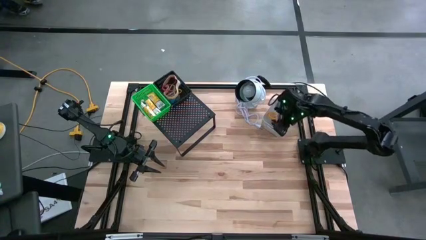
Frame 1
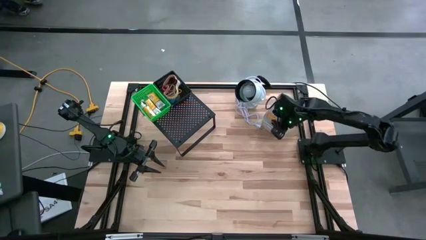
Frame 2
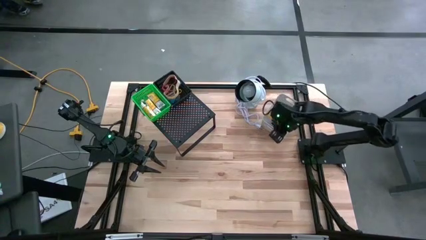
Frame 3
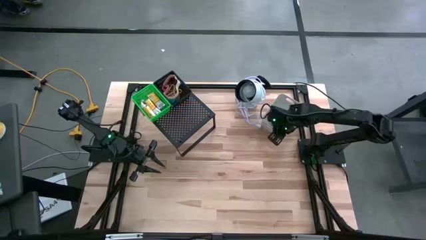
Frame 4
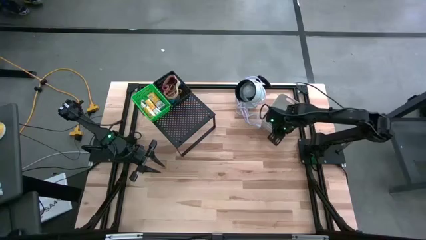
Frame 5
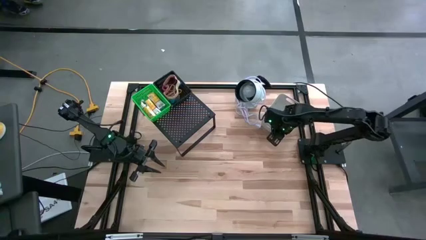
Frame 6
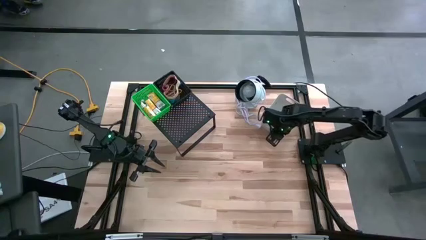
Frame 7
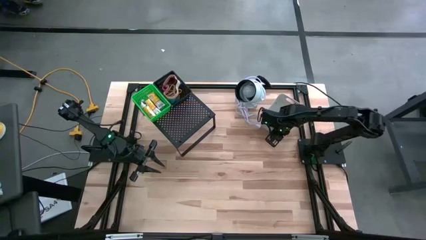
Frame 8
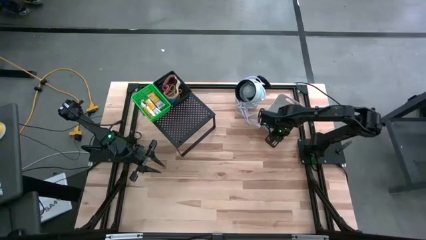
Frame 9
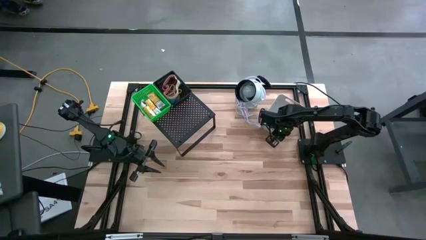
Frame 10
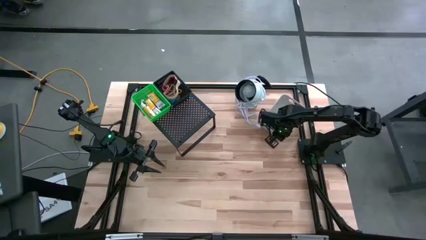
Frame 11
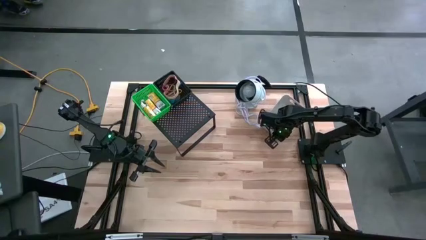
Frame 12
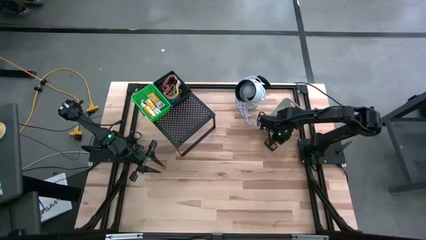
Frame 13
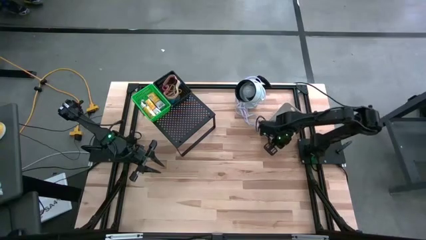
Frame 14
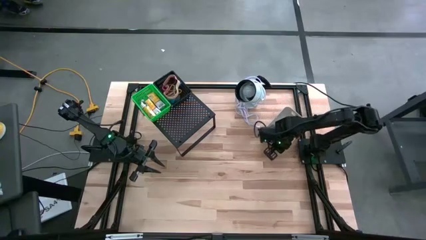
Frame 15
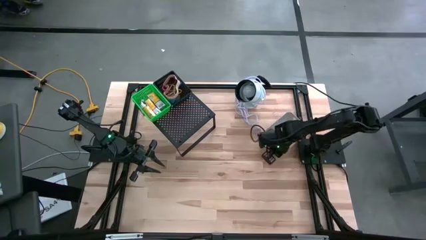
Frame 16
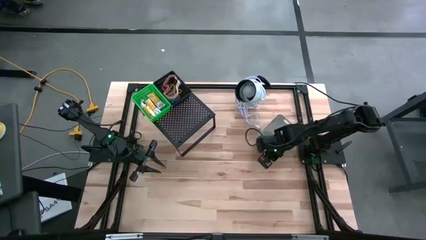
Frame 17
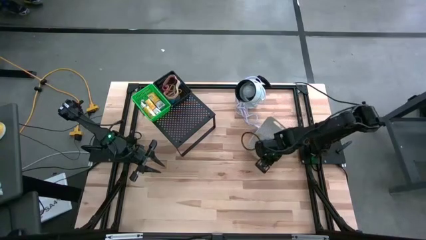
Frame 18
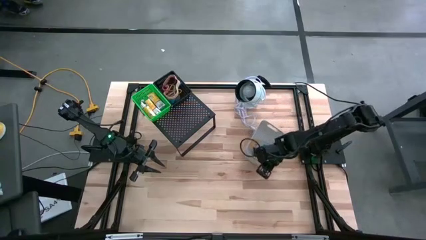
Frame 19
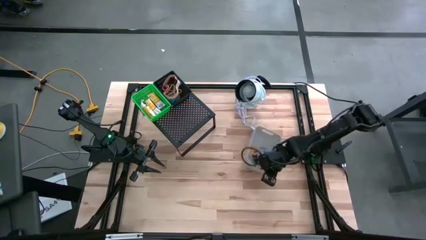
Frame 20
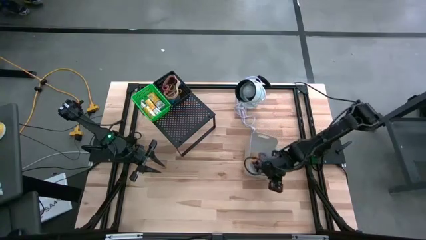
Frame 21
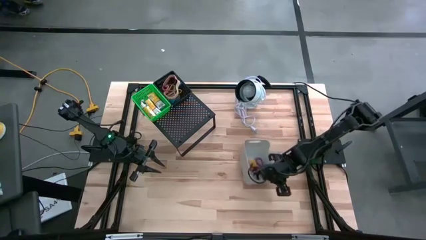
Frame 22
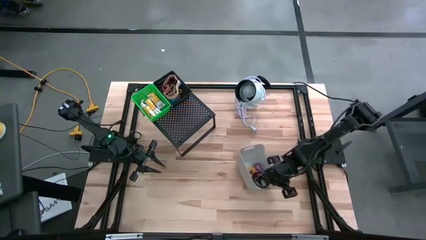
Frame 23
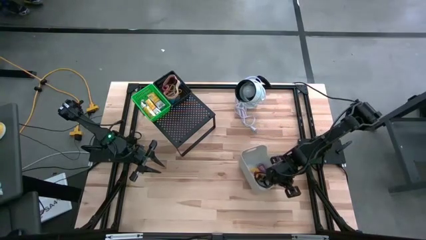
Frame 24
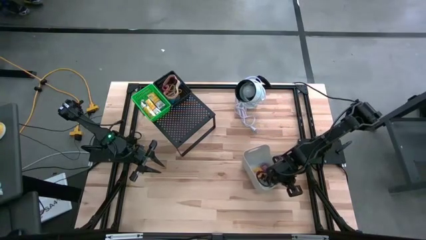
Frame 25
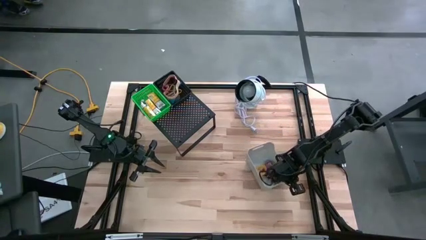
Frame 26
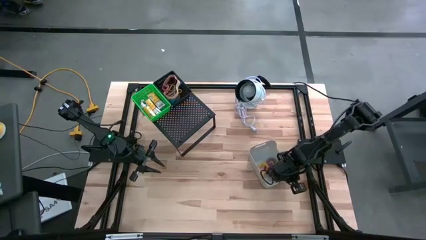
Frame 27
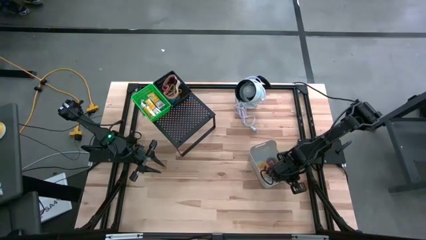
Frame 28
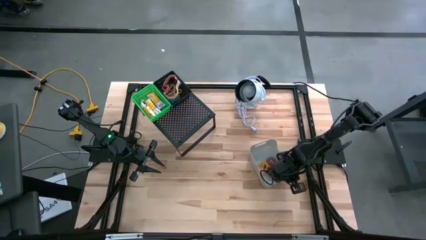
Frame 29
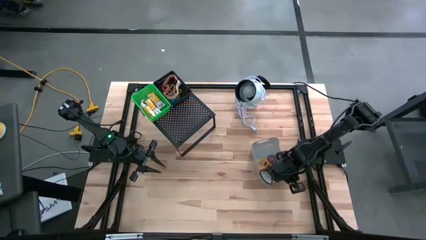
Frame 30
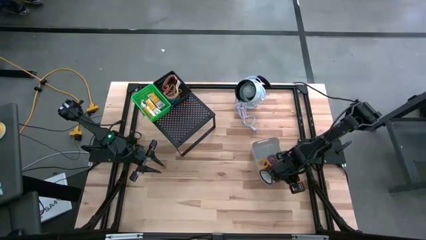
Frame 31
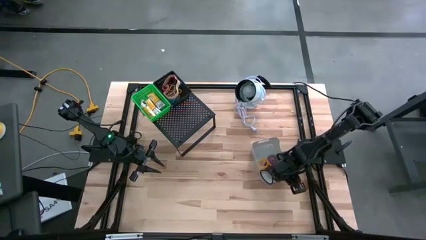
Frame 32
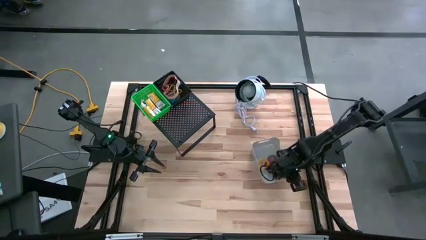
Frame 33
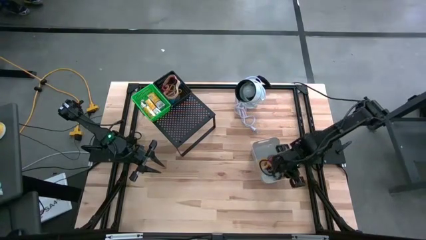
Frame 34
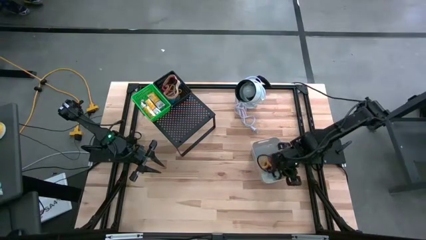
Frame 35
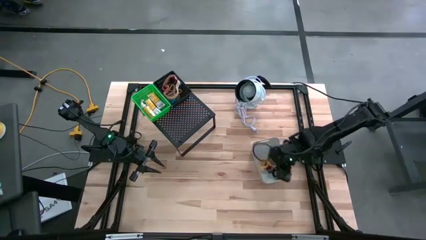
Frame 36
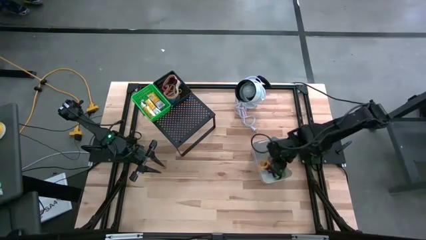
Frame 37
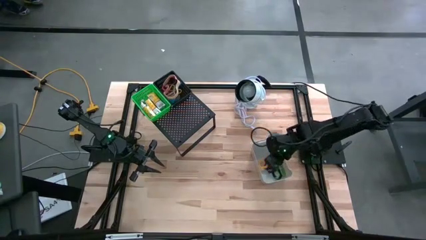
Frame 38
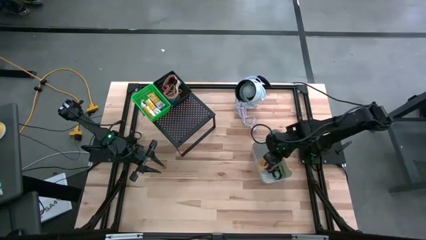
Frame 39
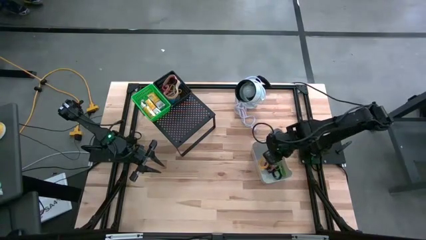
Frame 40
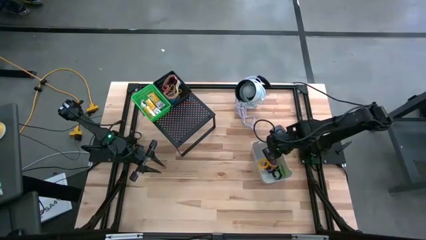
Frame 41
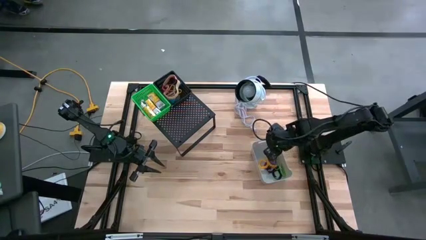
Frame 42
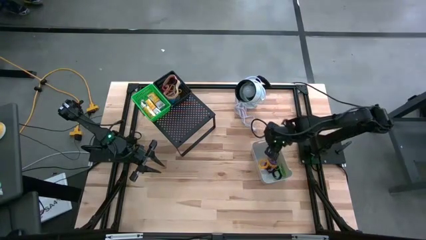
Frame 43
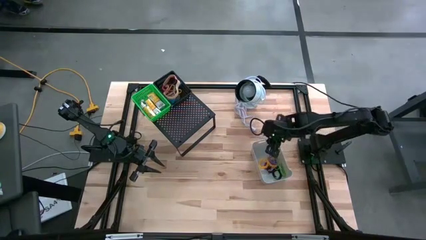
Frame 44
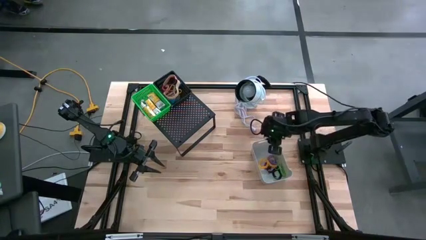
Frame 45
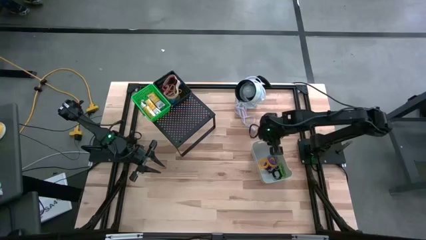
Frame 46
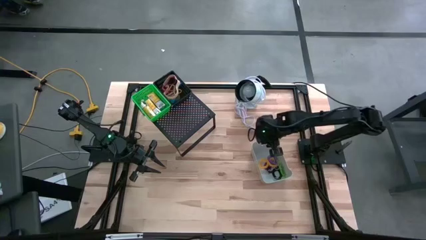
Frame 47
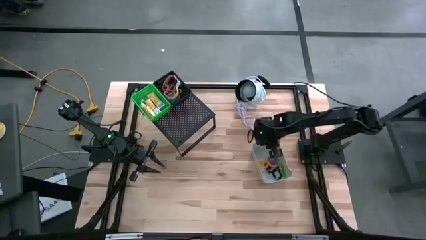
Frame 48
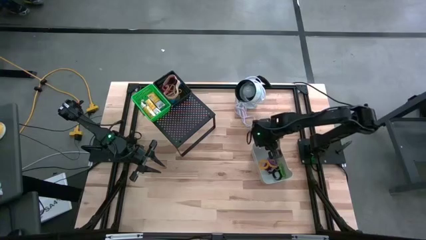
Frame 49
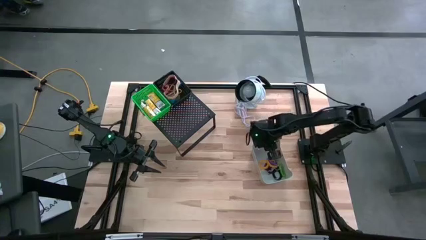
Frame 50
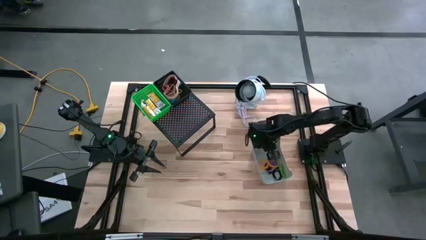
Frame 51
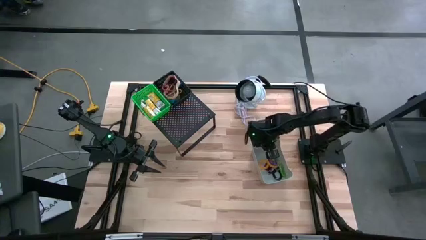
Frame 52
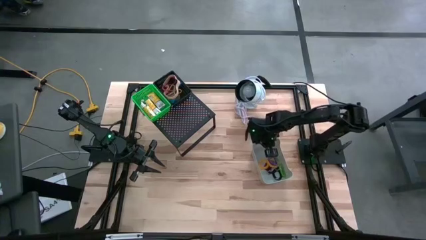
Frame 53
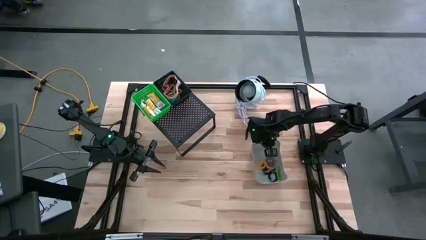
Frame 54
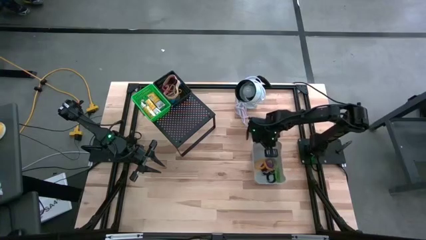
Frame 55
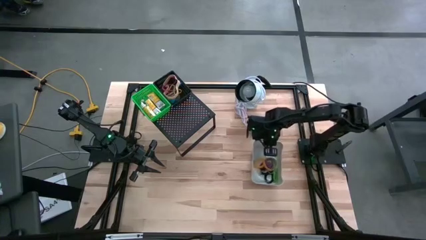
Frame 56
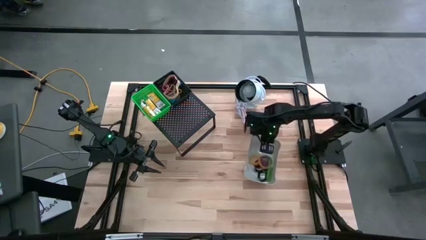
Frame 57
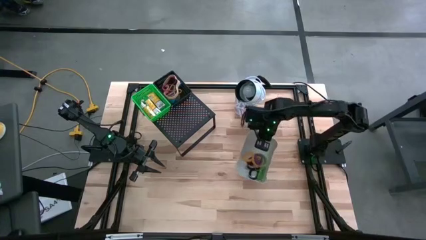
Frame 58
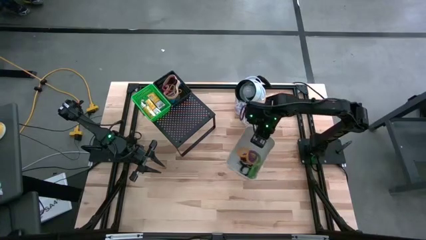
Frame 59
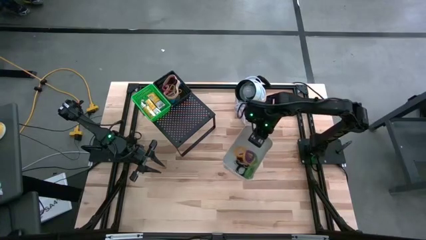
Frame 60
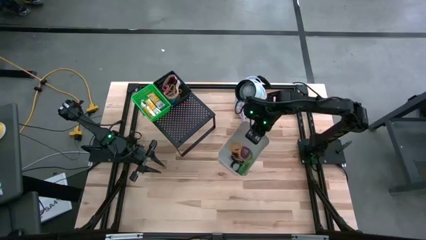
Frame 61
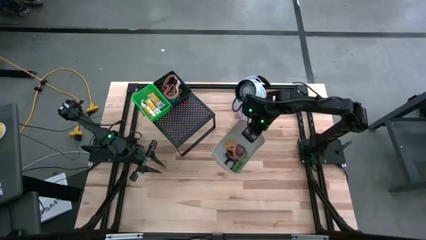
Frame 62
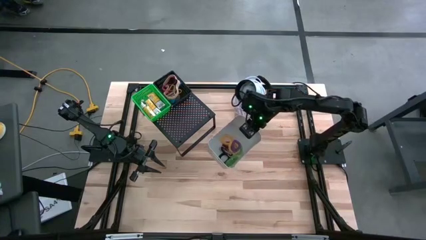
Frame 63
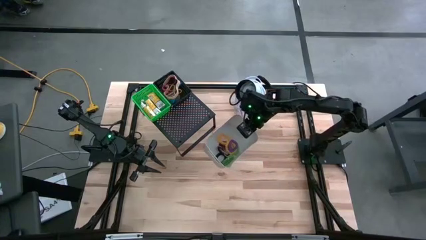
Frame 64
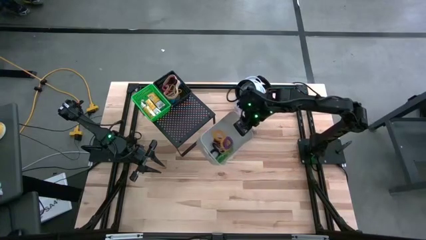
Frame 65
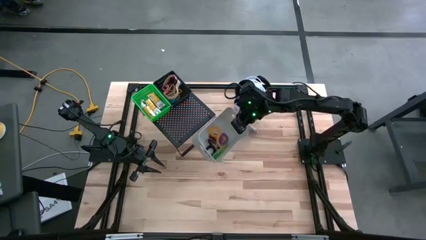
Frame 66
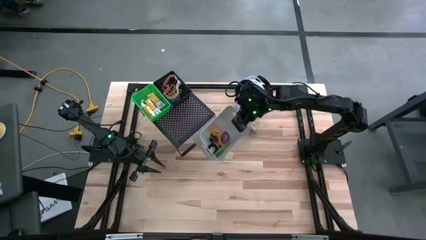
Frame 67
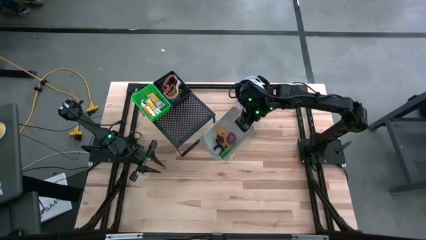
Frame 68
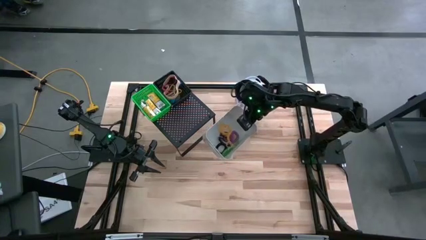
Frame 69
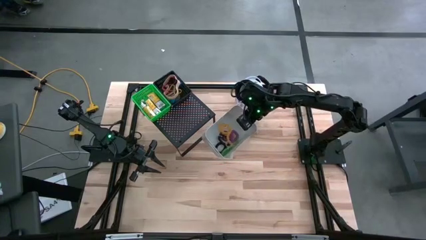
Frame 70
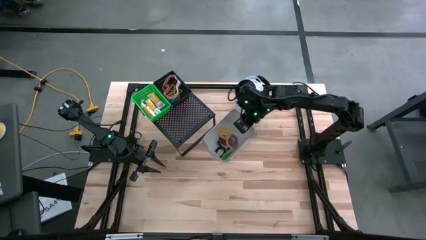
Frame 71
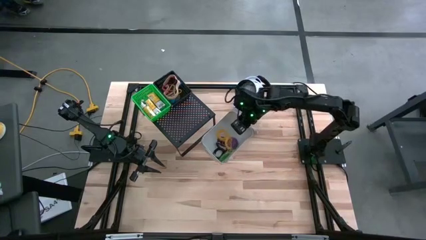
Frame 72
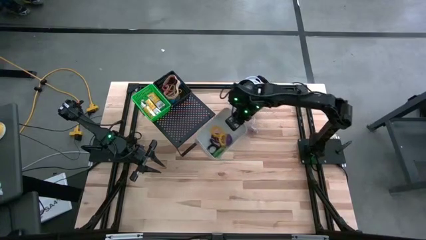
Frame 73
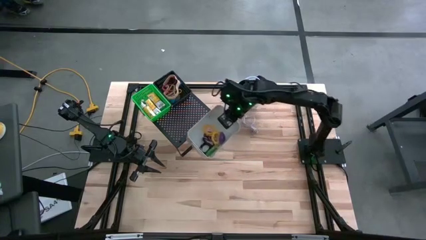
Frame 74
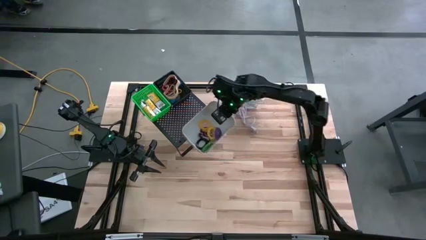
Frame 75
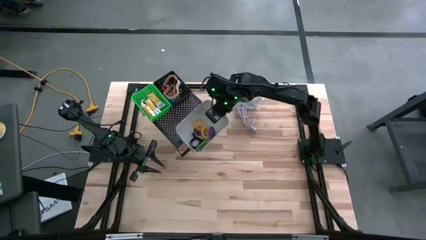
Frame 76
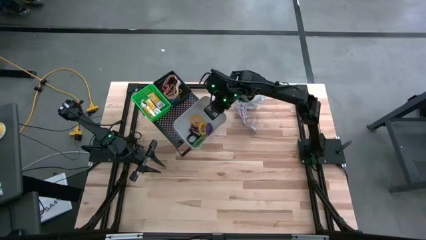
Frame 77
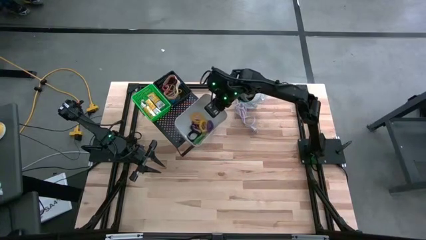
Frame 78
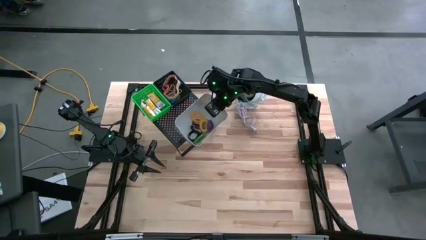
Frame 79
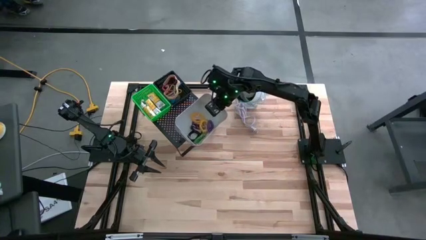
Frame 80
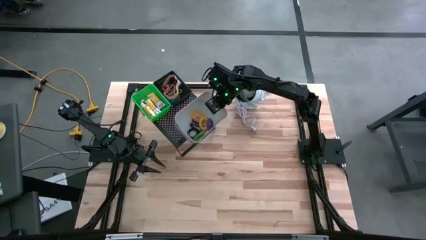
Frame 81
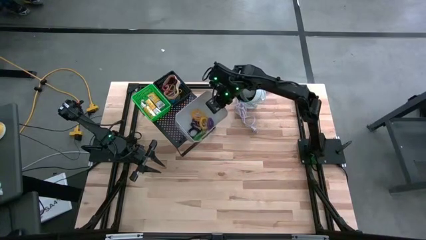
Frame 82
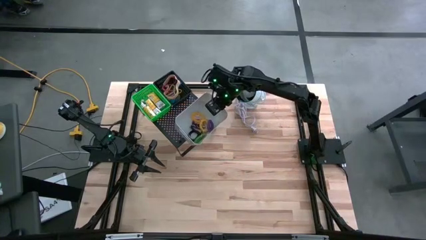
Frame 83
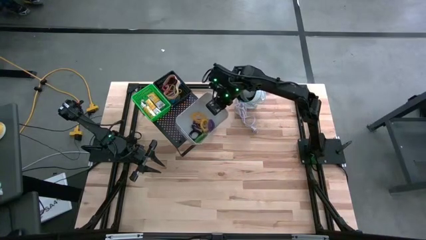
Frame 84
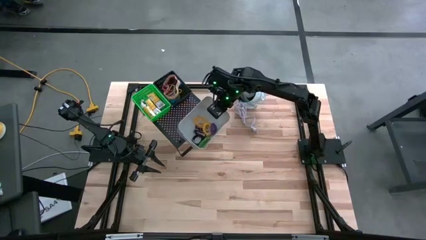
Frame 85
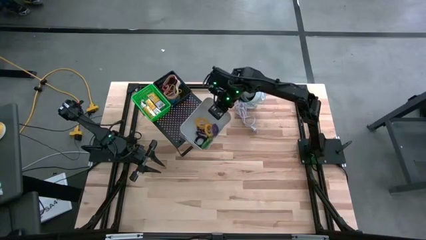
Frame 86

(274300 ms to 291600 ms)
Task: Pick & Place Office Desk Supplies
Put the white bin on the shelf
